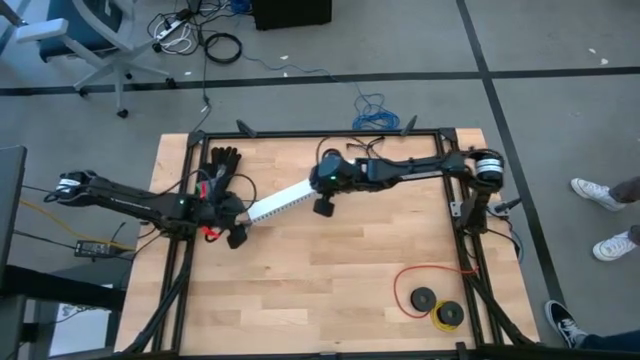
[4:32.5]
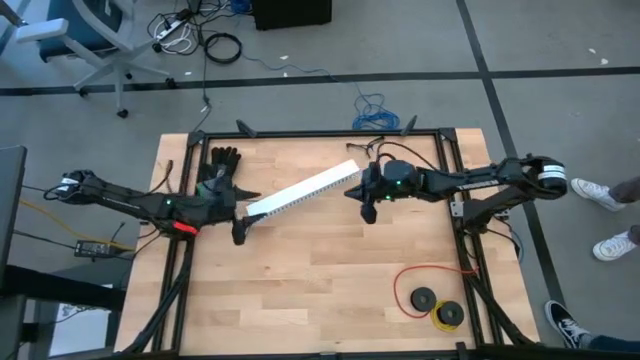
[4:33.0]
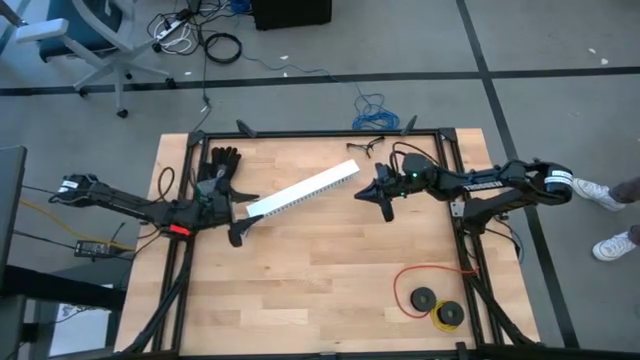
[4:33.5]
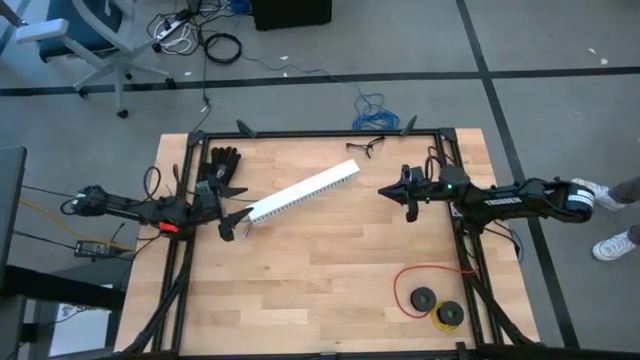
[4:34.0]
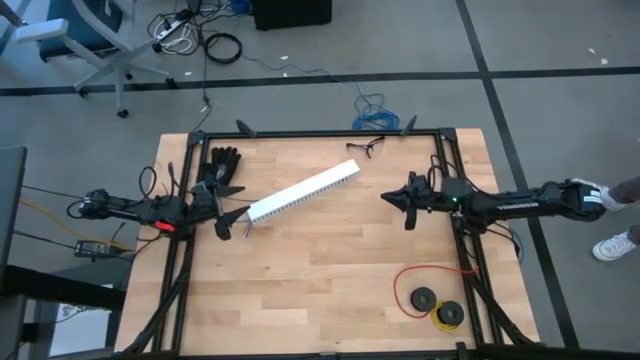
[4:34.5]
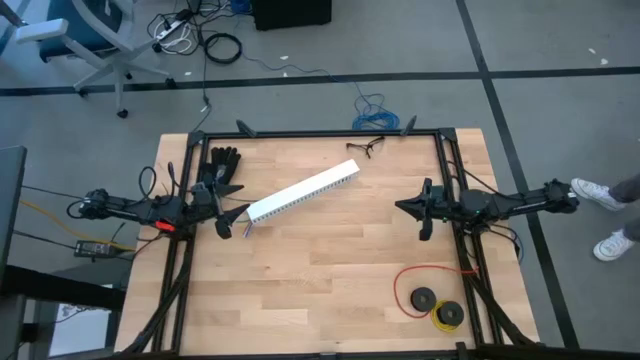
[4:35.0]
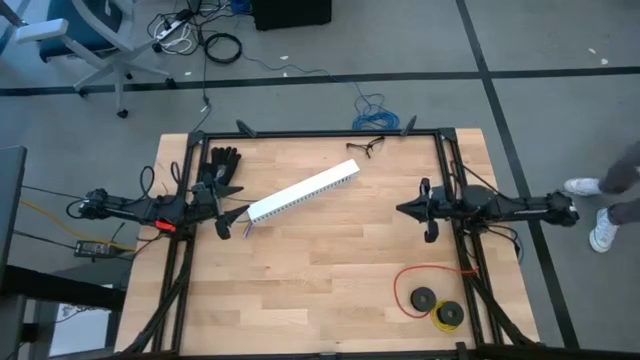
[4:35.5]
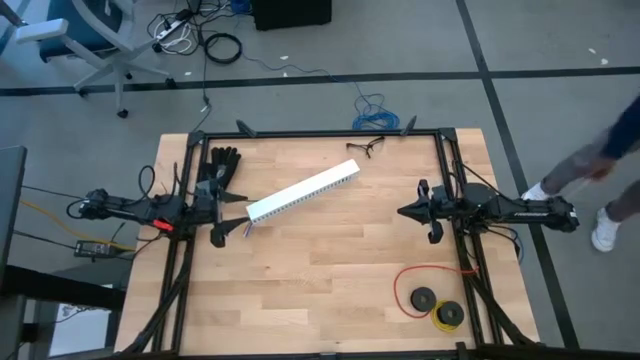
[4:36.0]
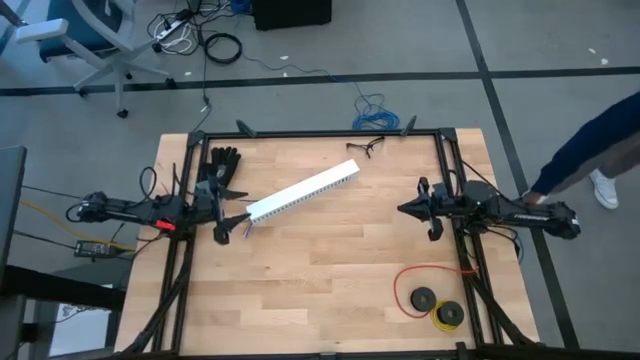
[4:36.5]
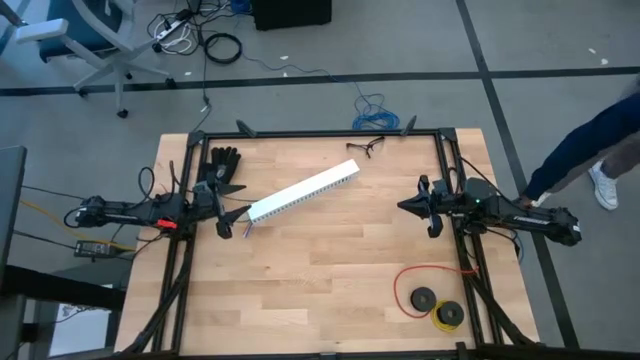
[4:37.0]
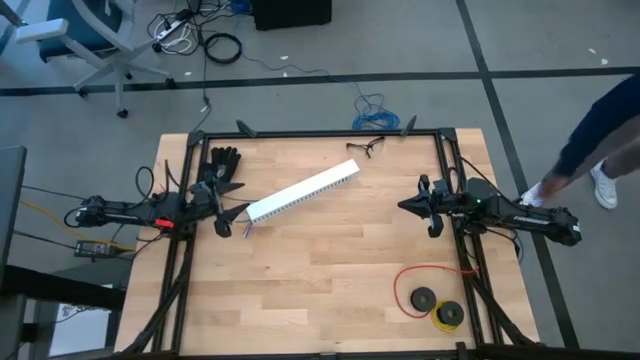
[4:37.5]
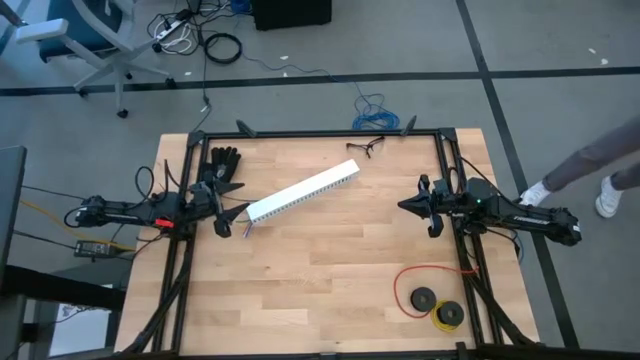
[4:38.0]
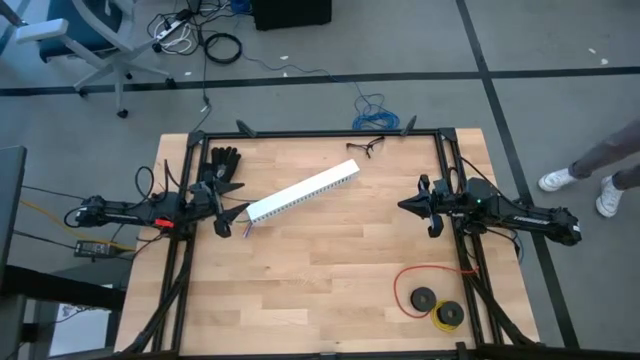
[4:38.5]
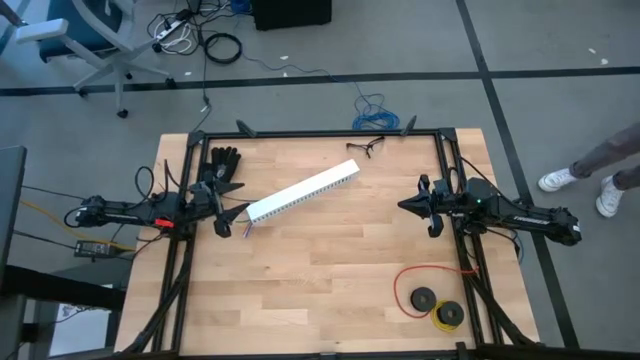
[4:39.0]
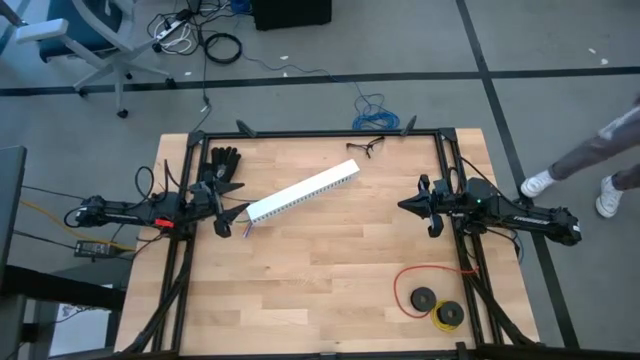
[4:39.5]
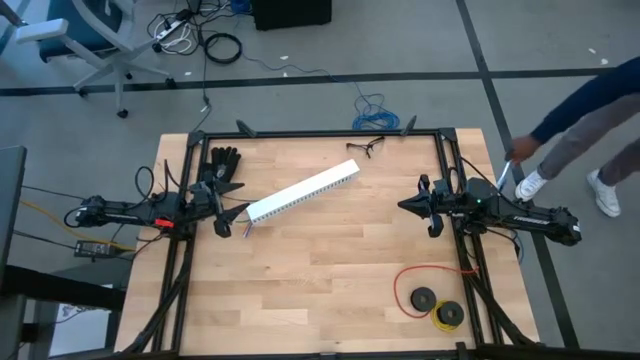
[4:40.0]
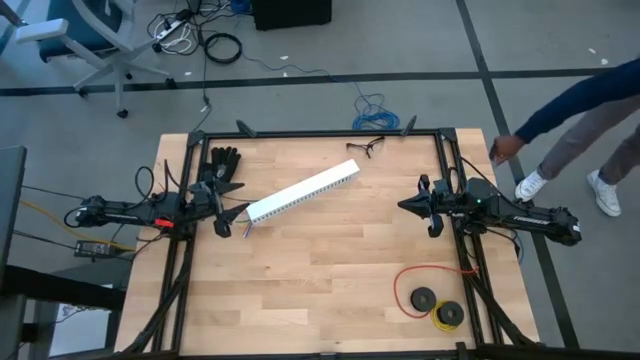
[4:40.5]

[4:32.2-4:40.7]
Task: Ziptie cables
Return to Home Position

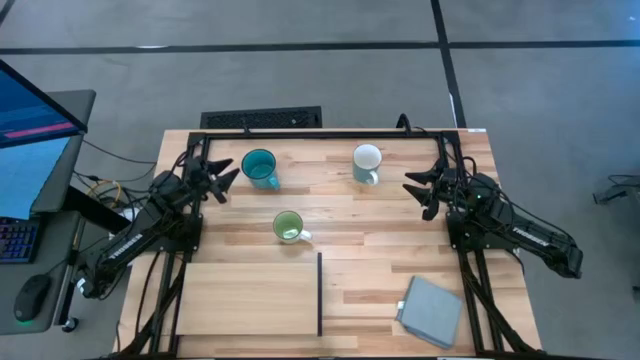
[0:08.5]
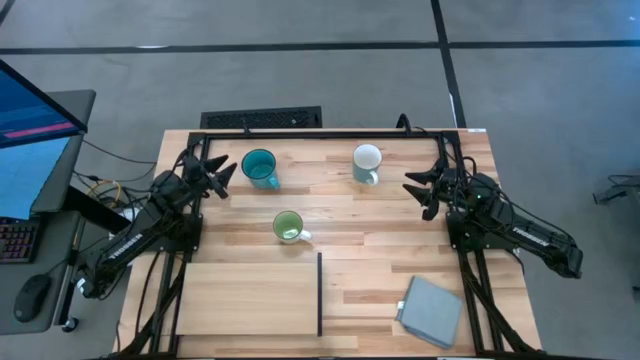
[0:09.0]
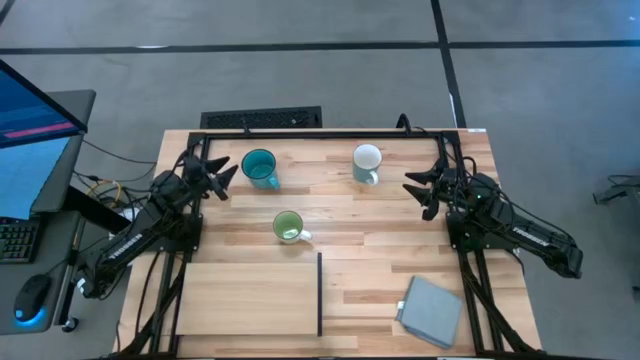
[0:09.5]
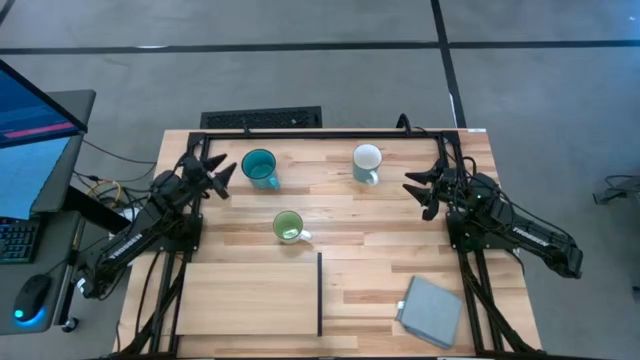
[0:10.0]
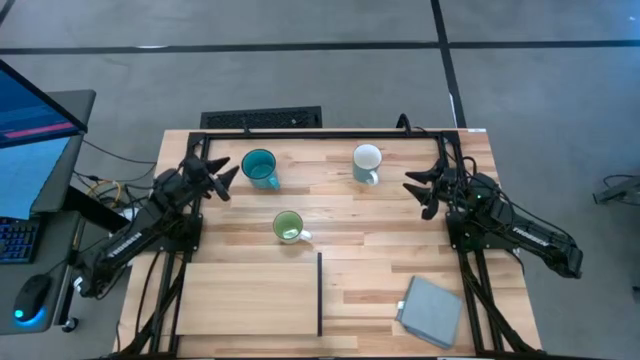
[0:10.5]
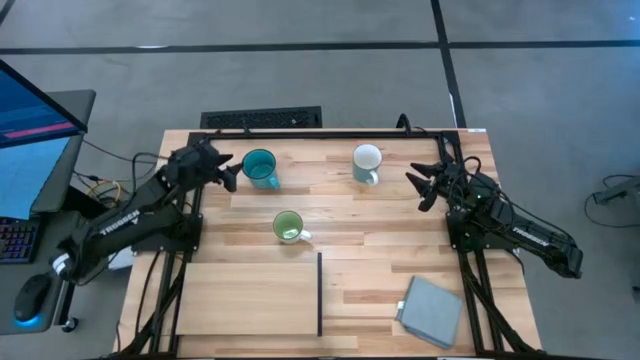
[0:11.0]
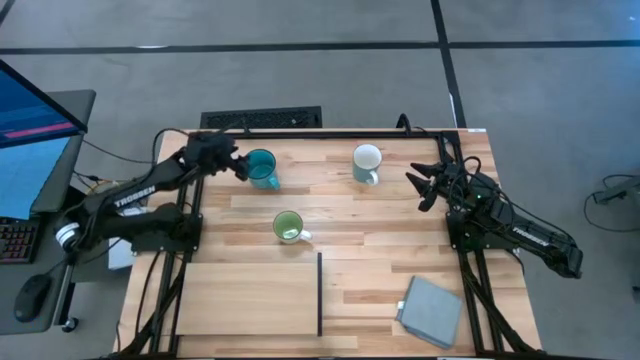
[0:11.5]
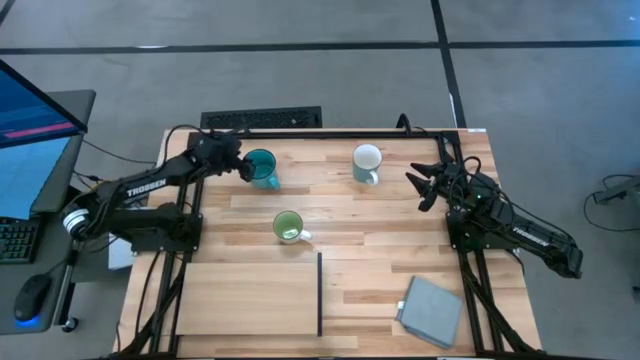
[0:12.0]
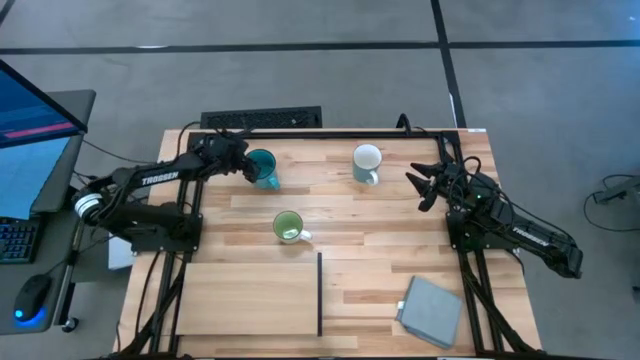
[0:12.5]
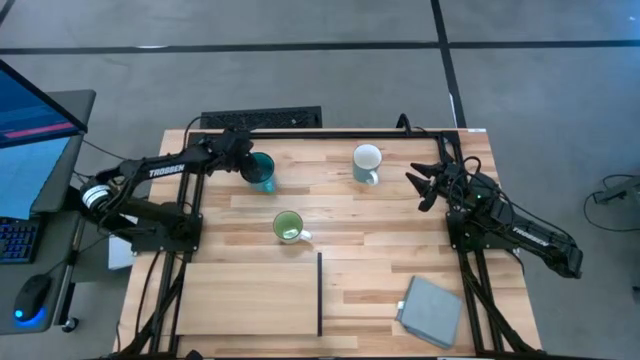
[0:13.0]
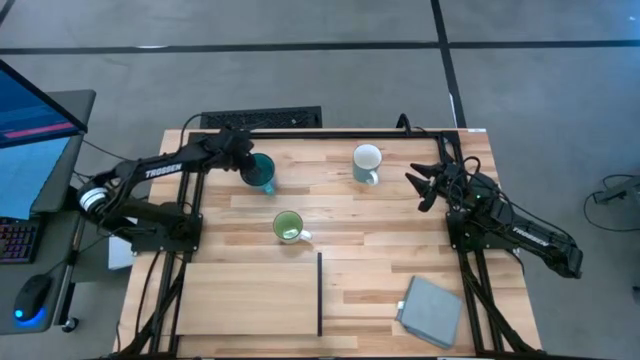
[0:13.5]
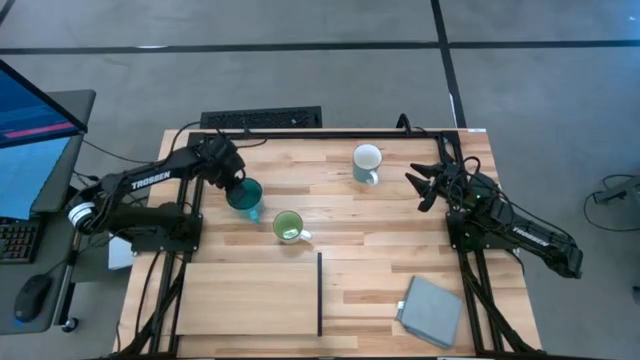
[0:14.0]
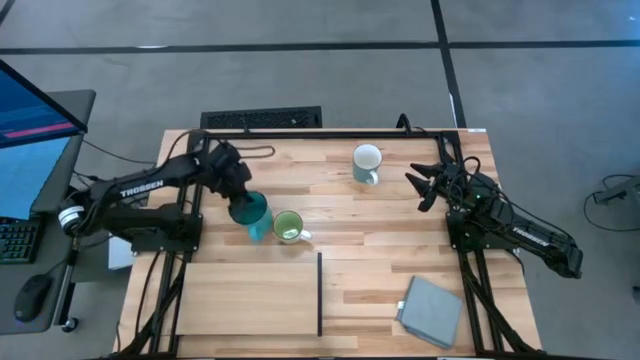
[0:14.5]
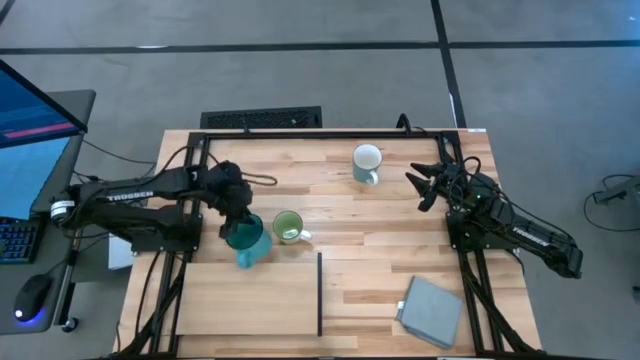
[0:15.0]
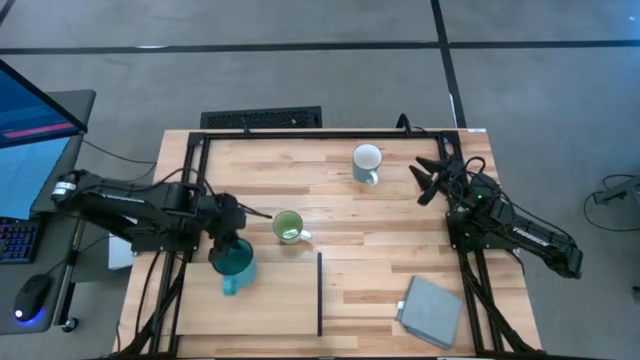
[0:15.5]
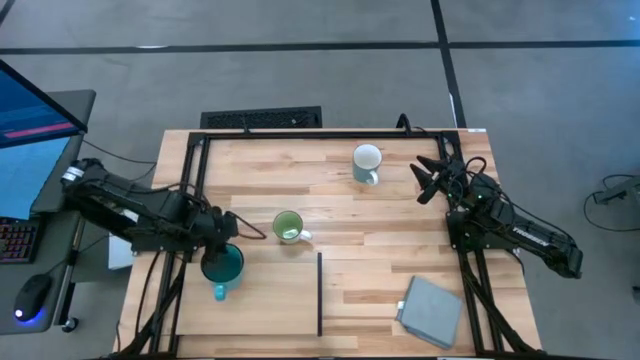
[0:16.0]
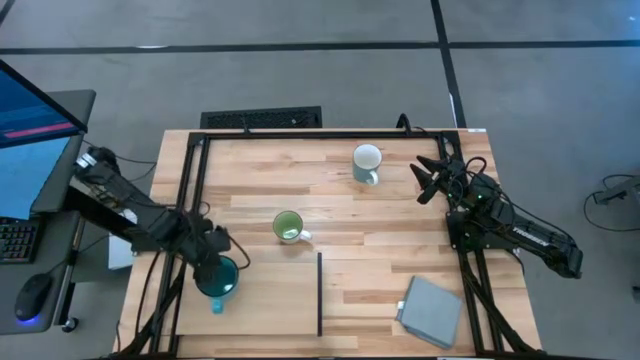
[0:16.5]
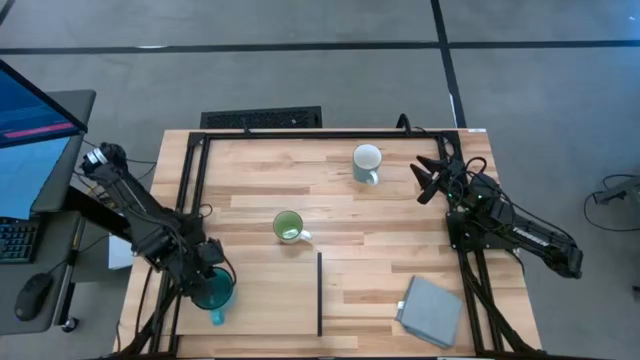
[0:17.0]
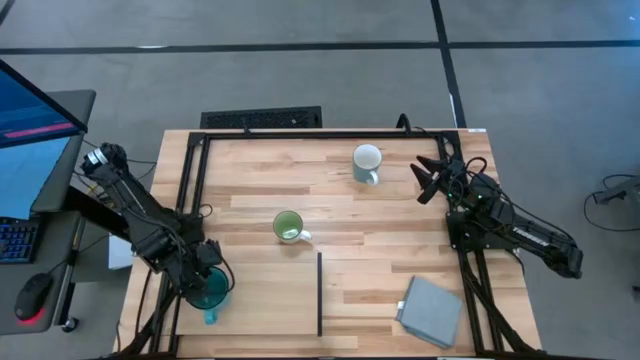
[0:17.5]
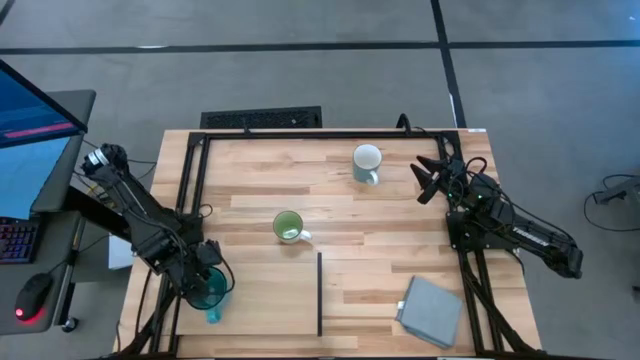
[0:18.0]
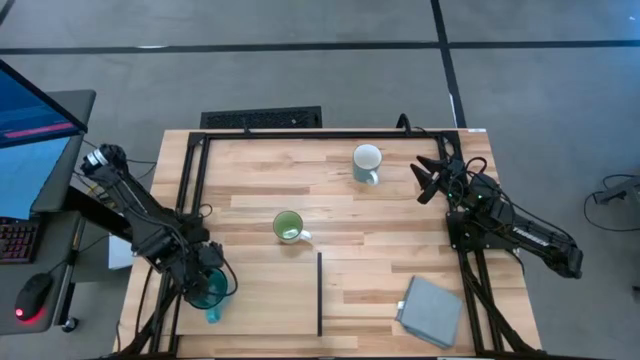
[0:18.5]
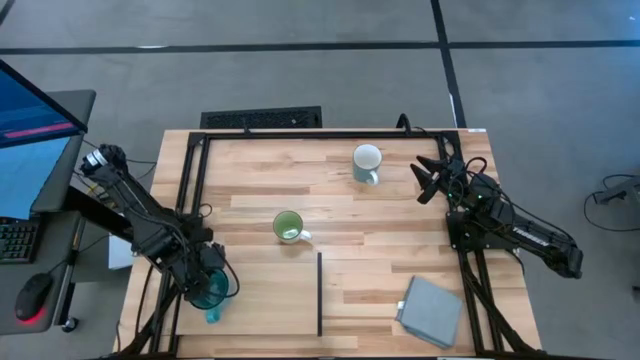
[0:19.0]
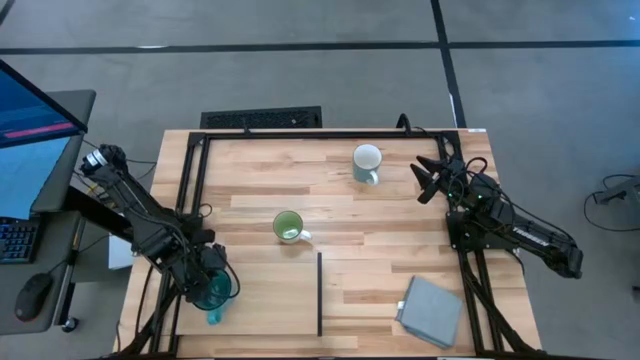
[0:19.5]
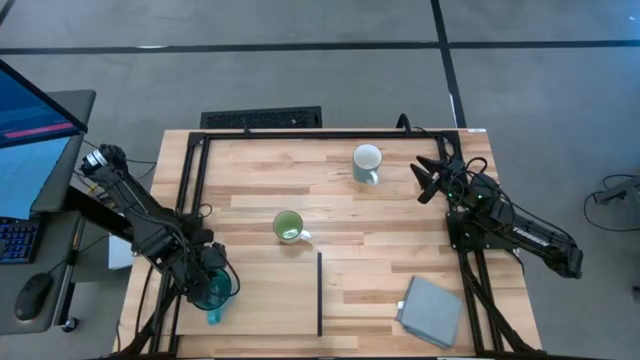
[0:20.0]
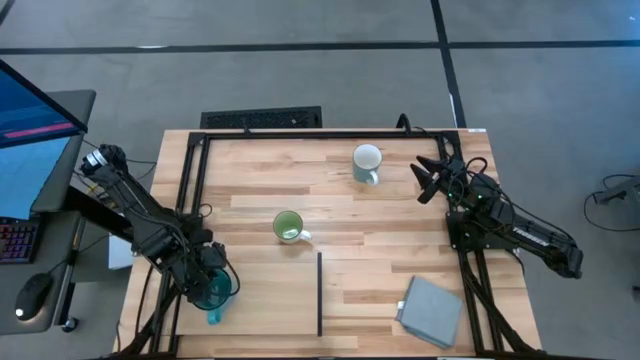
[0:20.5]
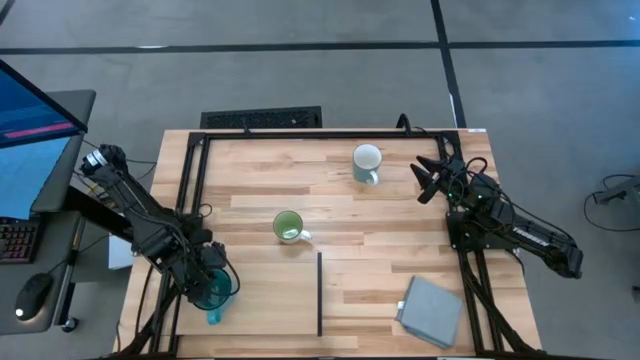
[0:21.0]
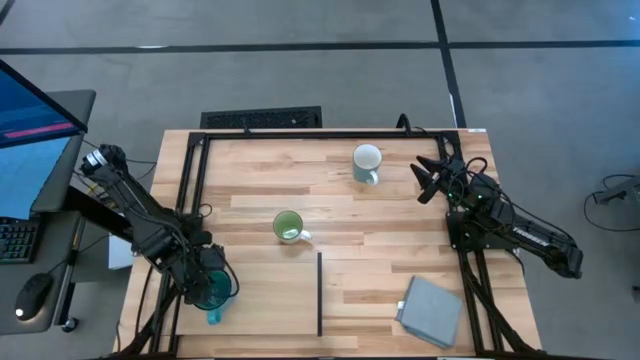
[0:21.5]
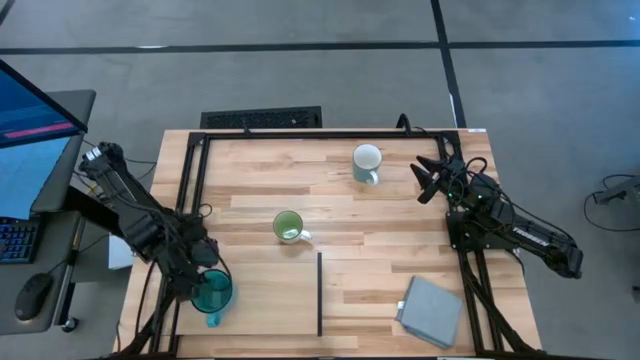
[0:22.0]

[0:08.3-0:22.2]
Task: Stack small to large cups/mugs on shelf
Put the blue mug on the shelf
